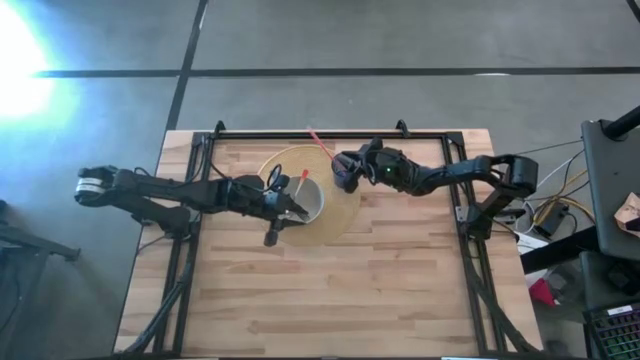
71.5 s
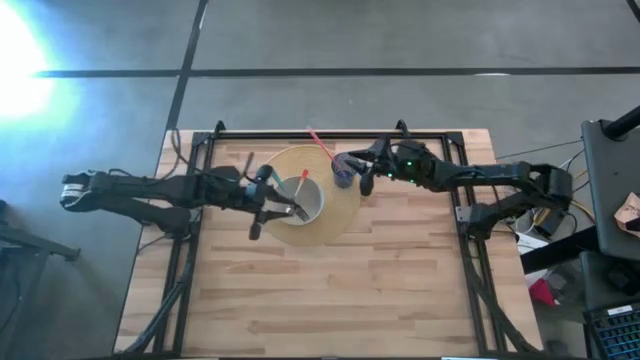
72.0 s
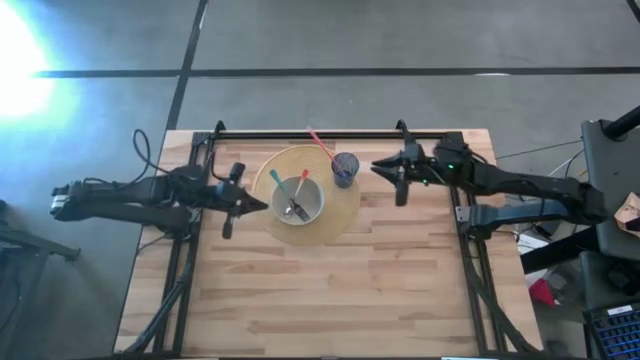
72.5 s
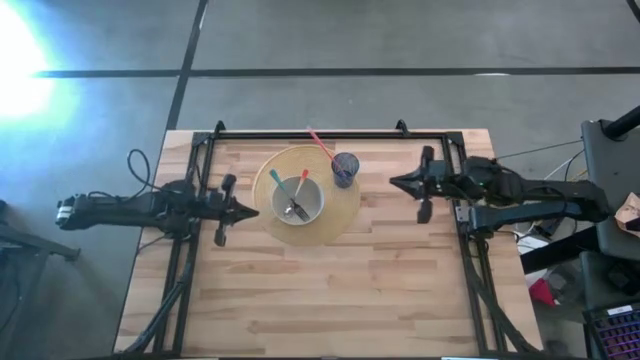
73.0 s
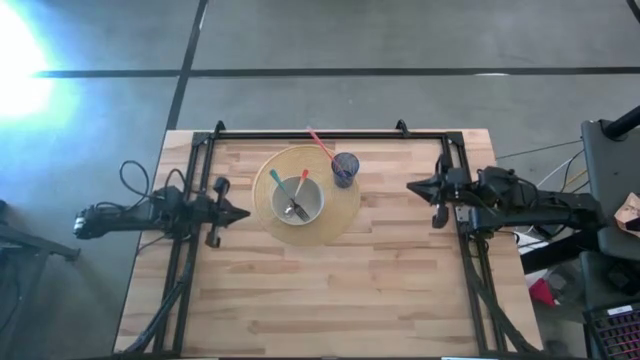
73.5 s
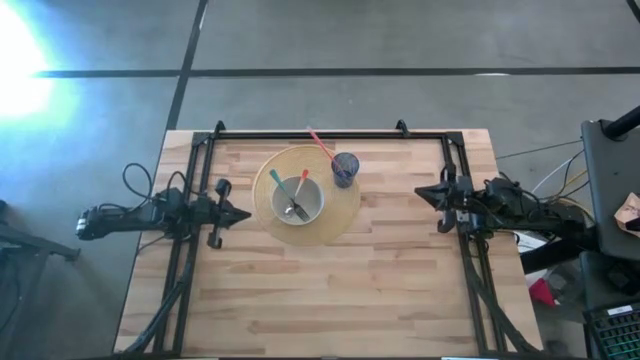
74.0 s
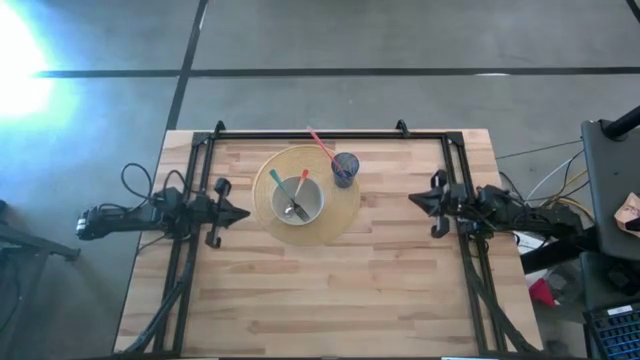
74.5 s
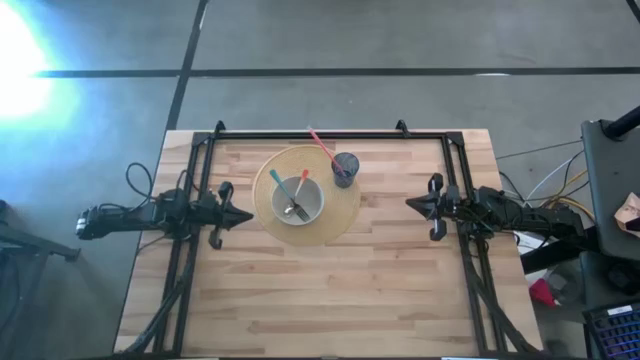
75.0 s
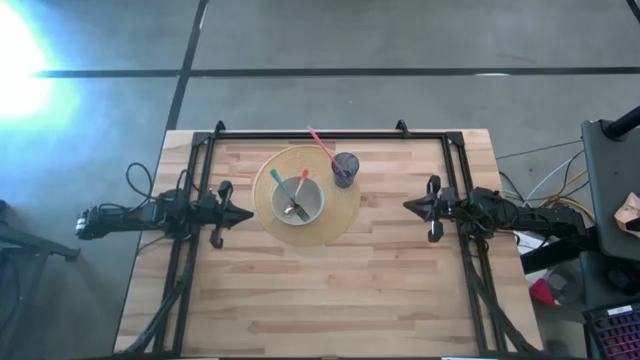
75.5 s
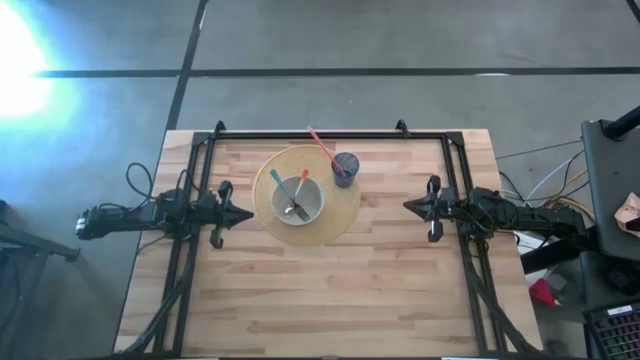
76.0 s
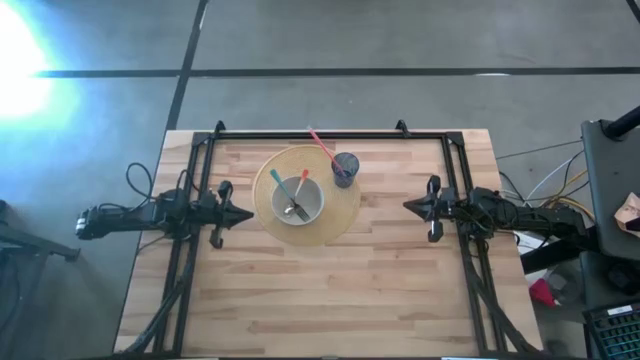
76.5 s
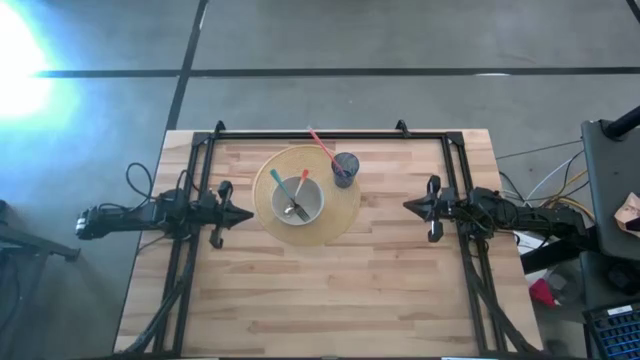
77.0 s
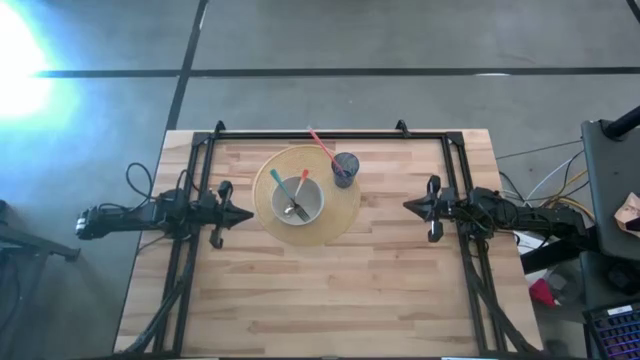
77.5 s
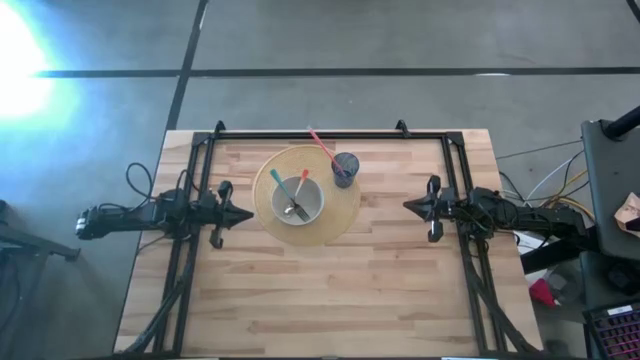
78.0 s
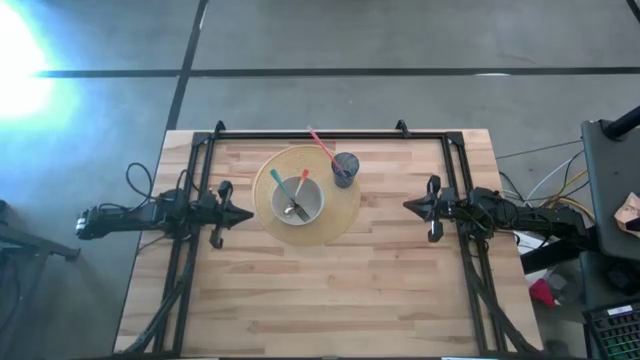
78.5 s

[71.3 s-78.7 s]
Task: Pick & Place Utensil
Return to Home Position

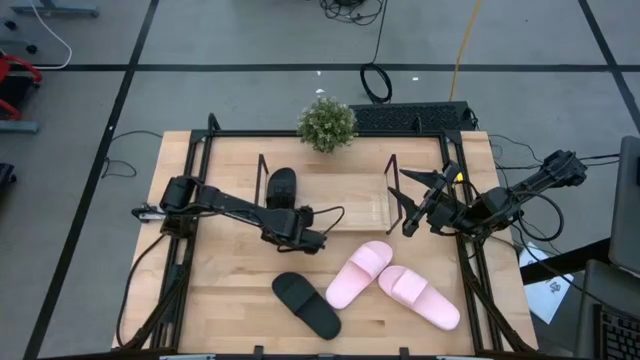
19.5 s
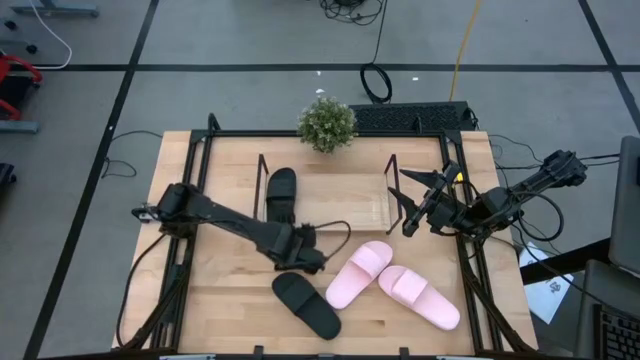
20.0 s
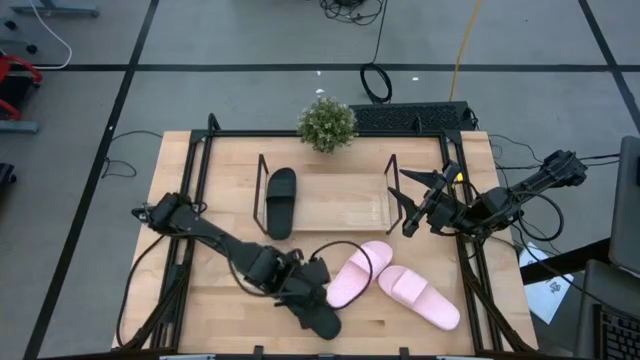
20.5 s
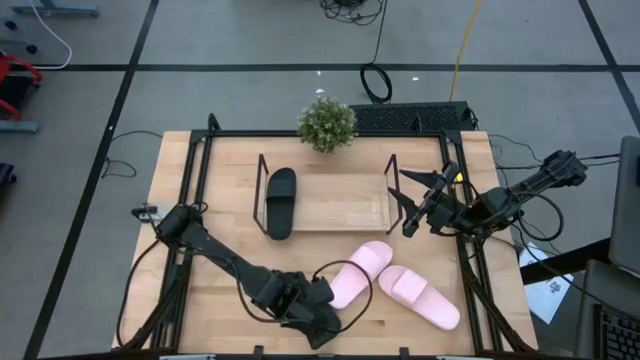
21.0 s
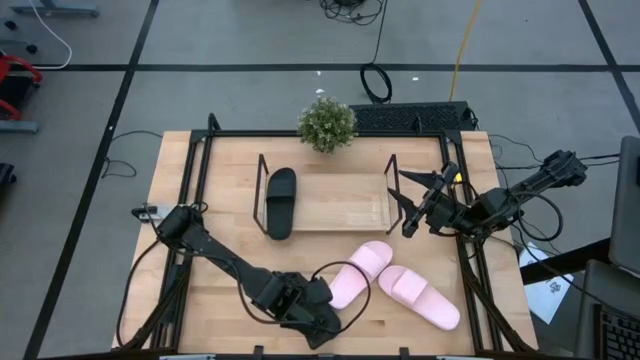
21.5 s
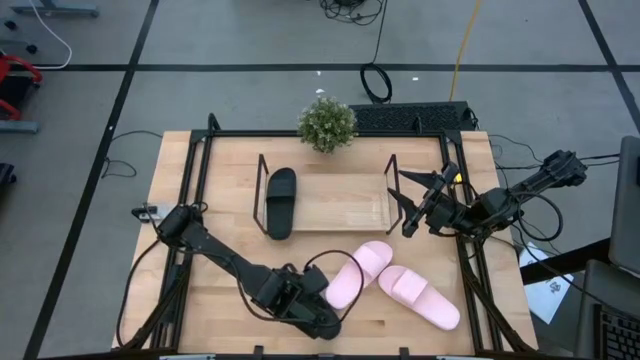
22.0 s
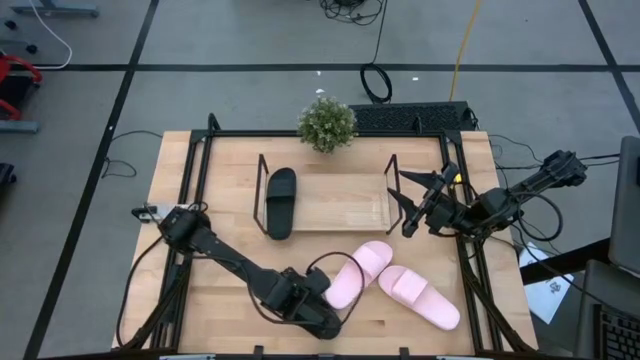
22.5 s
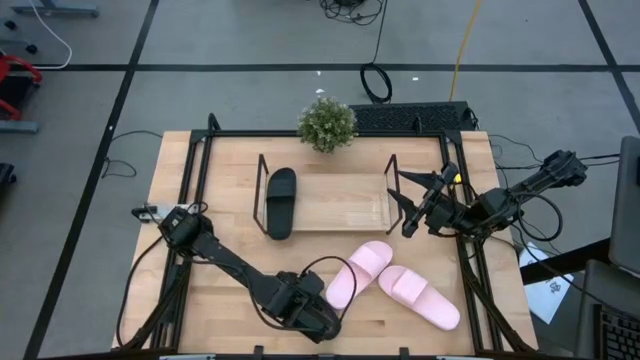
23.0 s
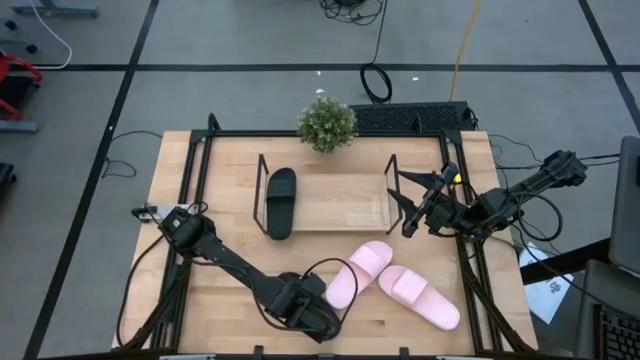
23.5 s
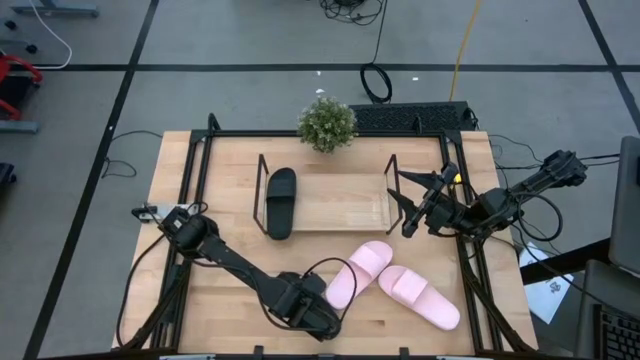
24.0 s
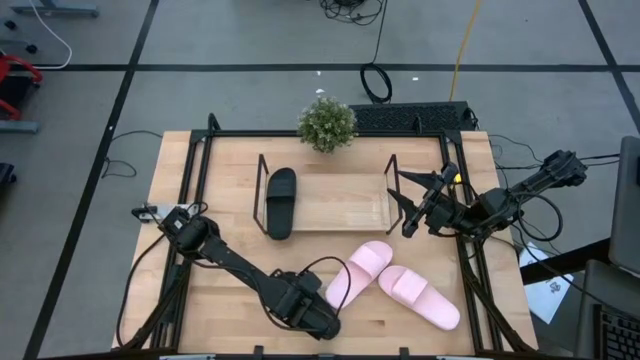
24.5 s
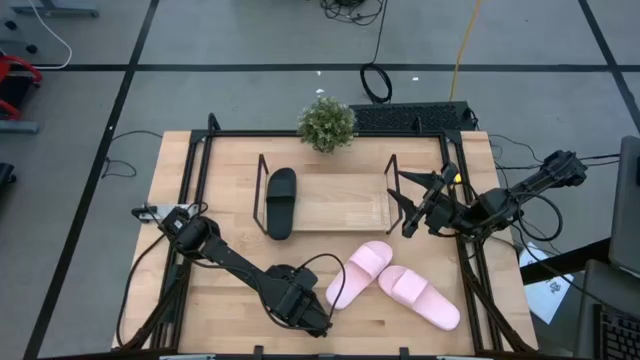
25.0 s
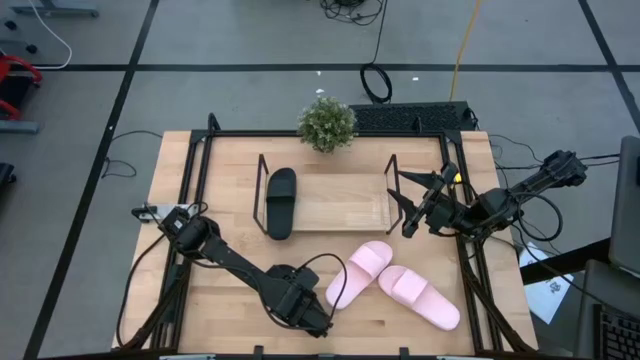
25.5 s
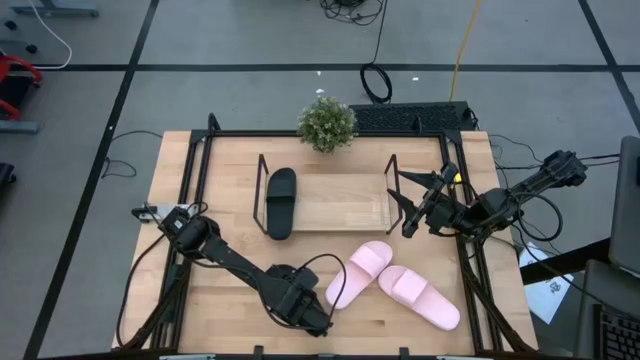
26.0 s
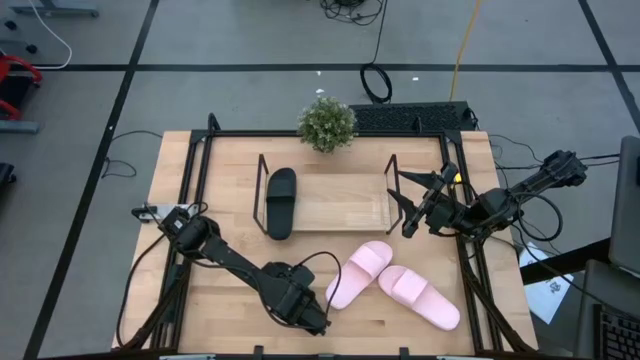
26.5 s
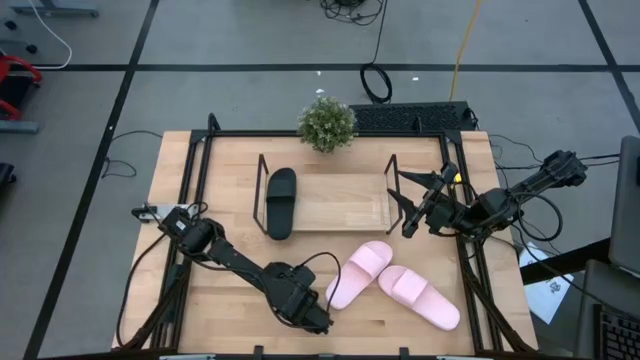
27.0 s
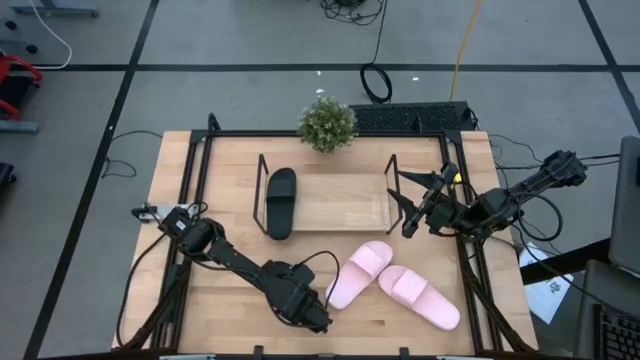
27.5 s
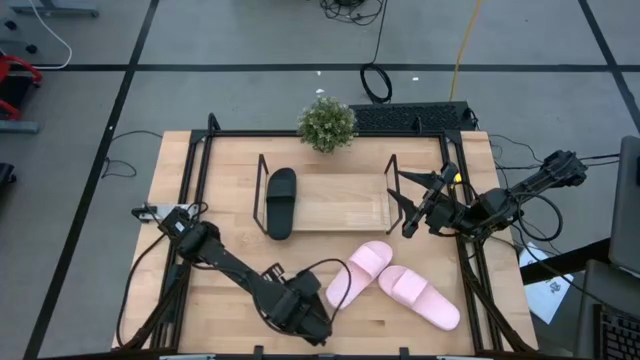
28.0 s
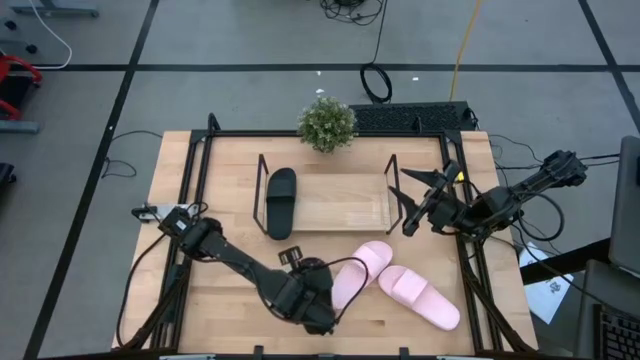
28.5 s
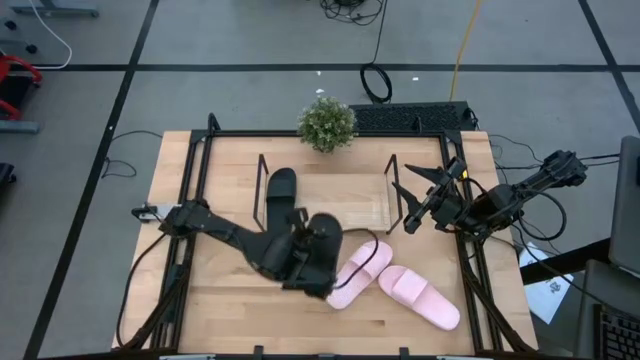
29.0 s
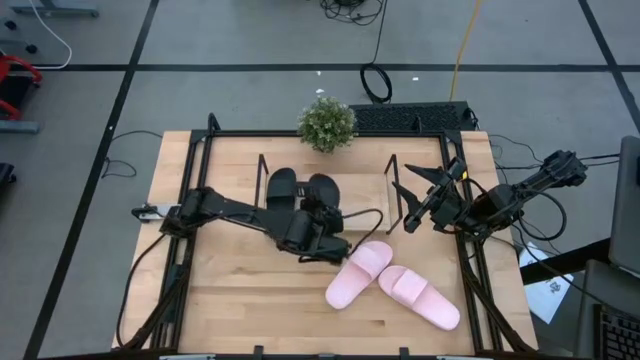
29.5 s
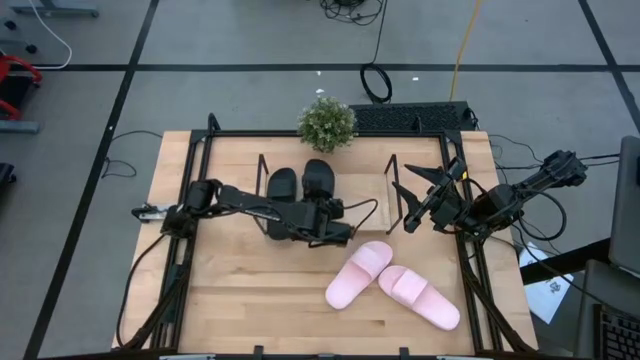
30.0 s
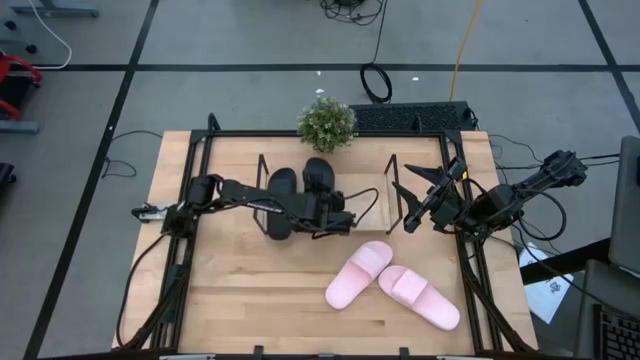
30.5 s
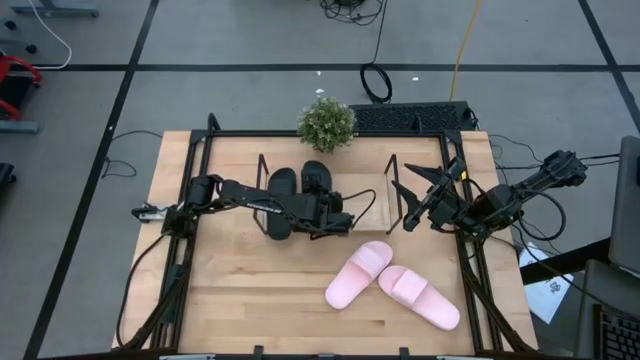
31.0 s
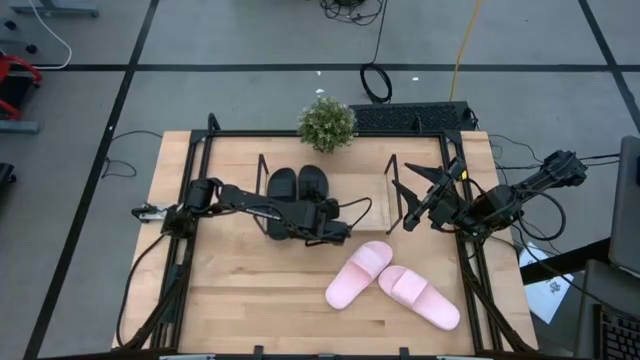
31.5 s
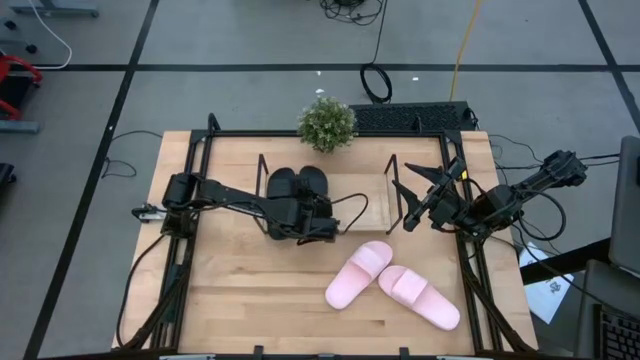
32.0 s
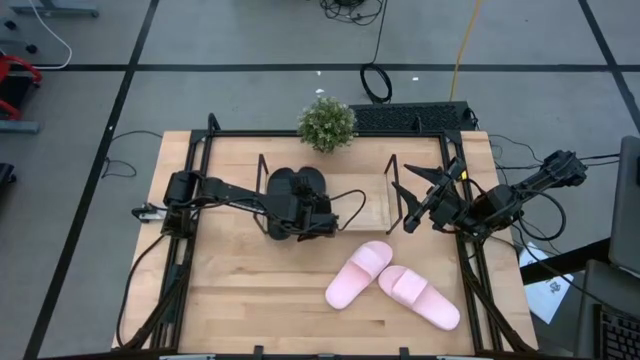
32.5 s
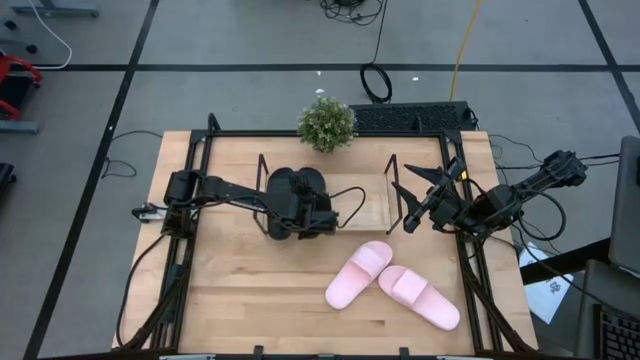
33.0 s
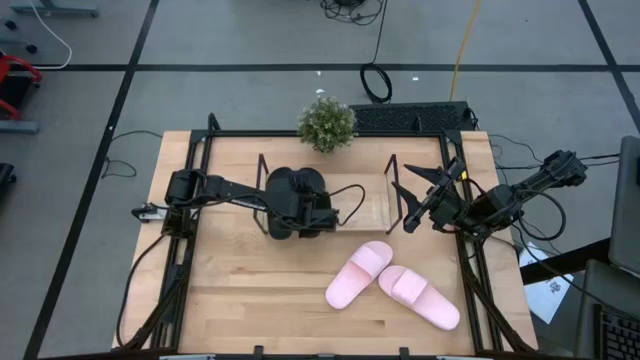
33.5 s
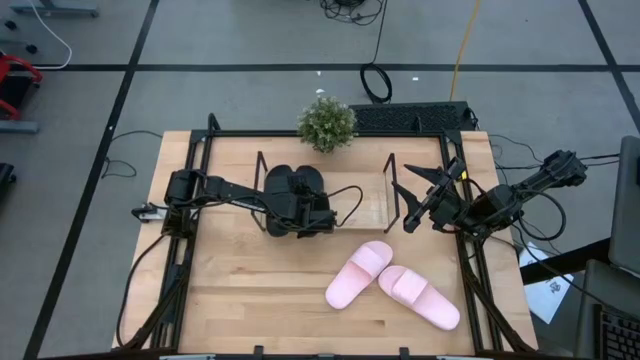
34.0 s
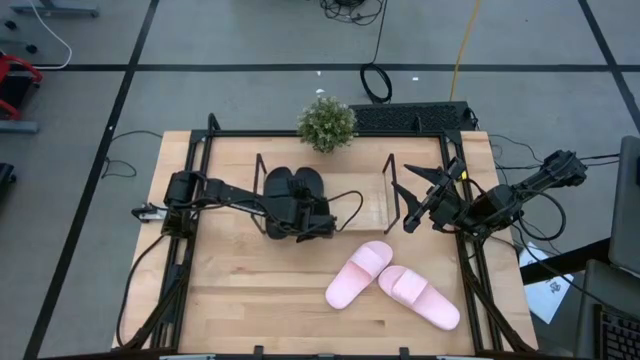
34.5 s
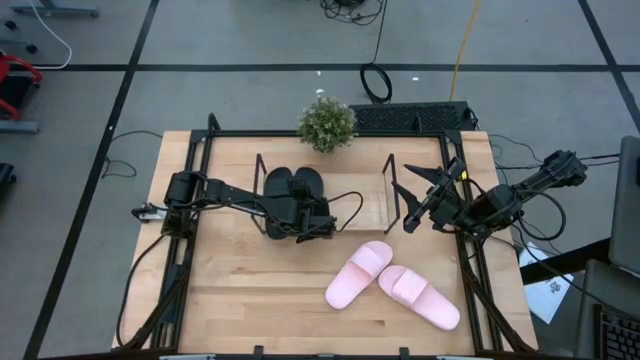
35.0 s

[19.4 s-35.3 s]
Task: Pick and place slides into the shelf
Put the black slide on the shelf
